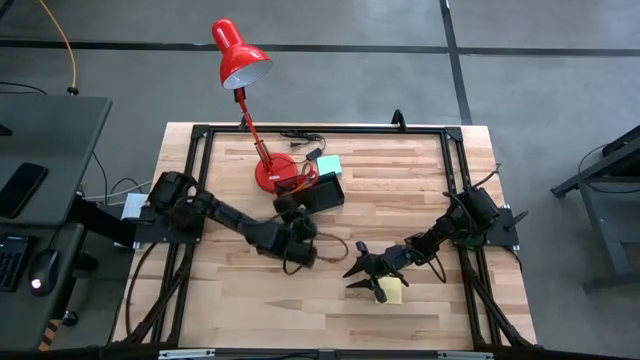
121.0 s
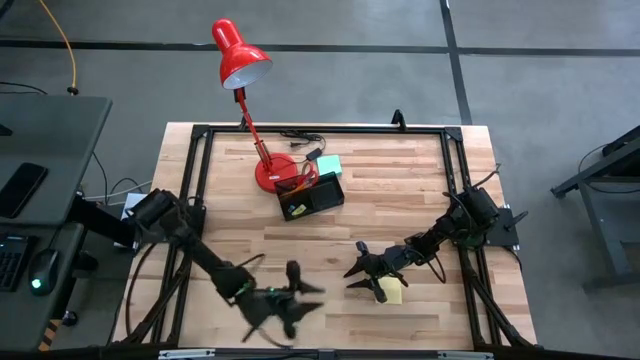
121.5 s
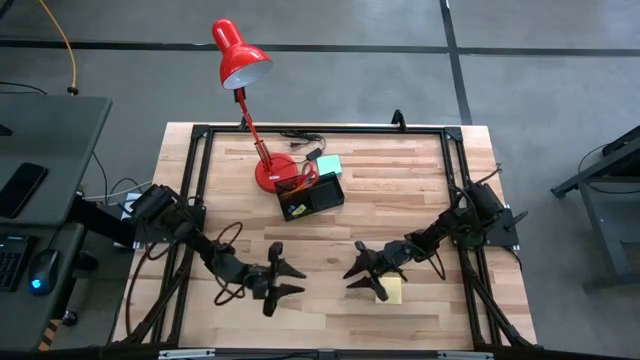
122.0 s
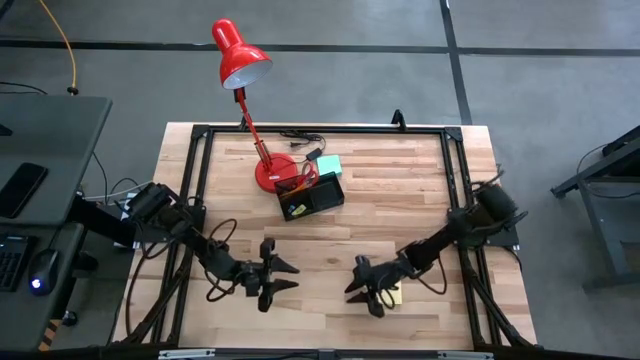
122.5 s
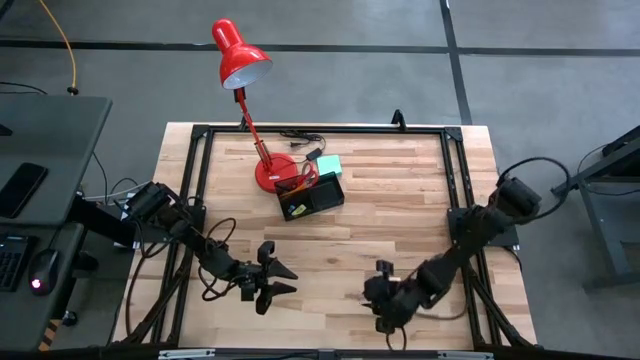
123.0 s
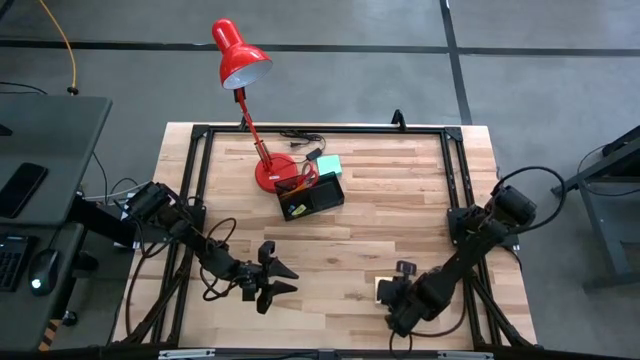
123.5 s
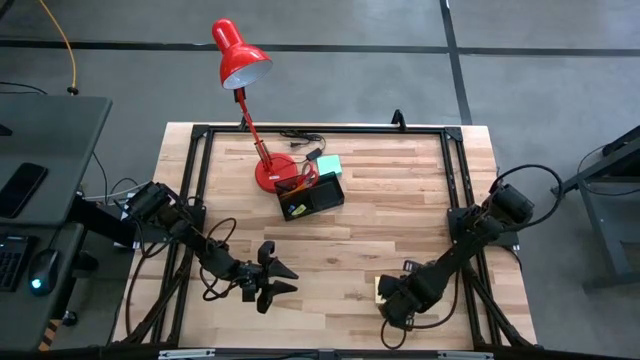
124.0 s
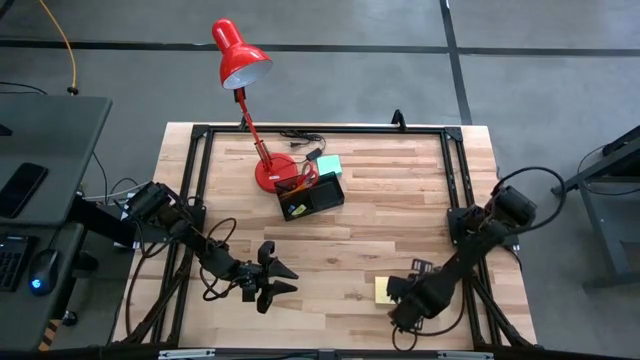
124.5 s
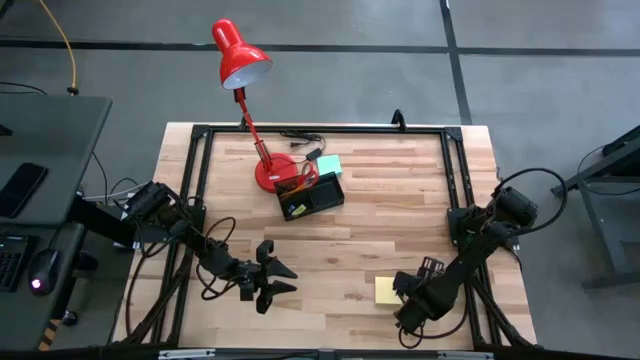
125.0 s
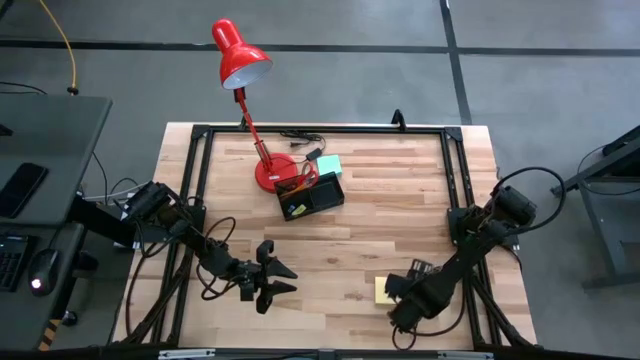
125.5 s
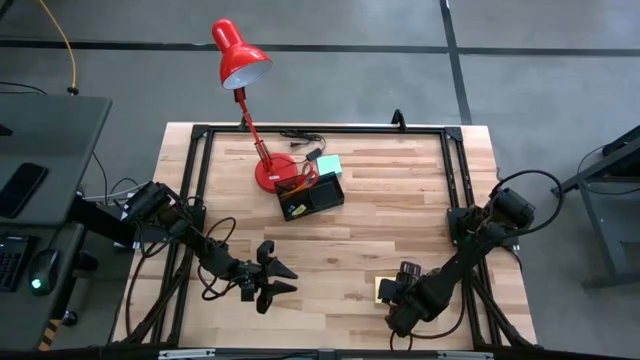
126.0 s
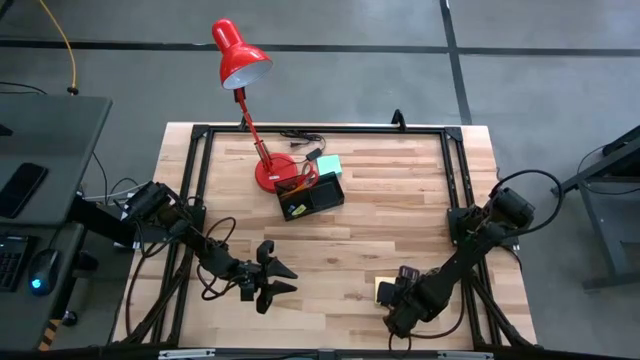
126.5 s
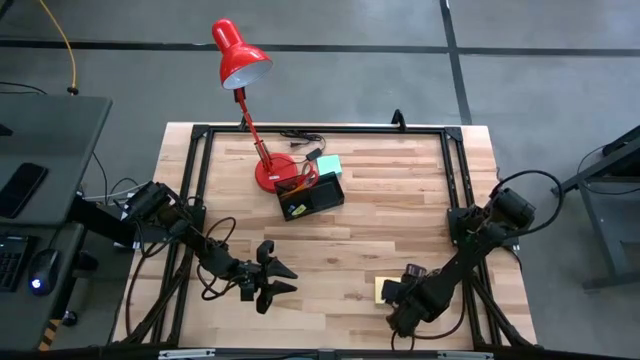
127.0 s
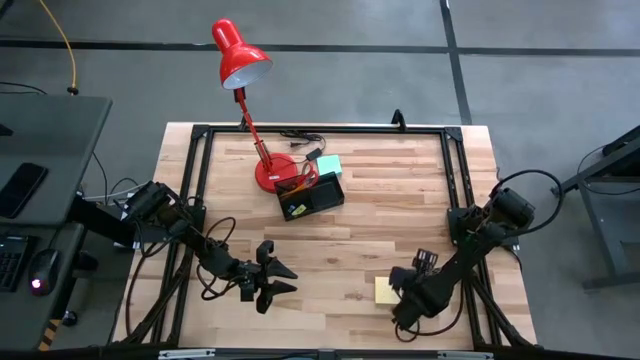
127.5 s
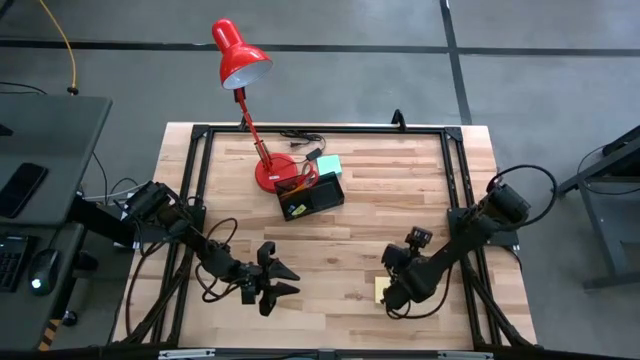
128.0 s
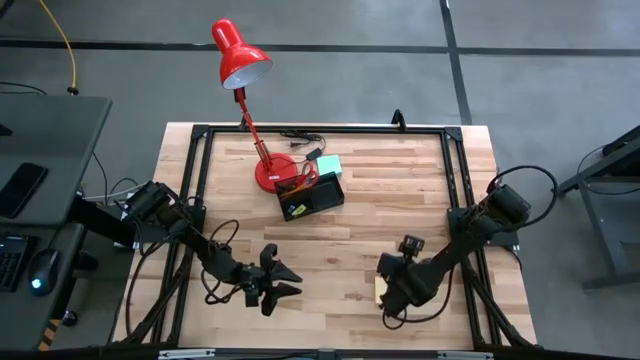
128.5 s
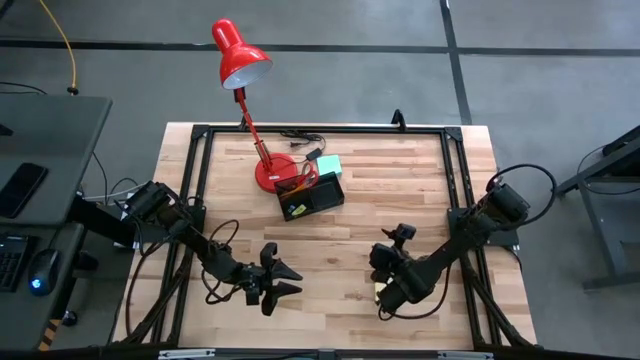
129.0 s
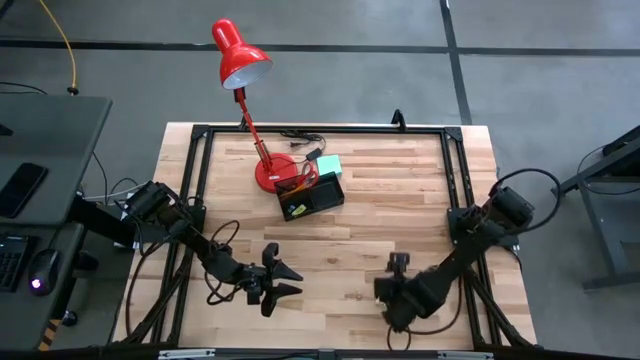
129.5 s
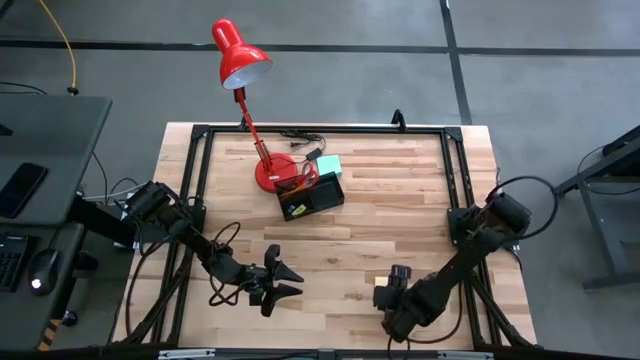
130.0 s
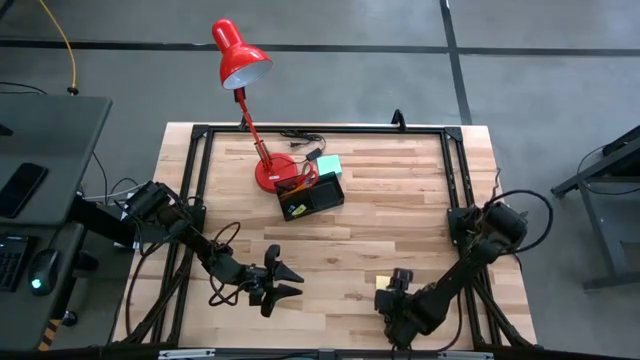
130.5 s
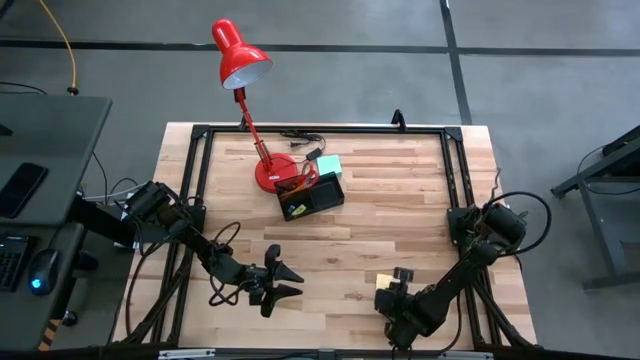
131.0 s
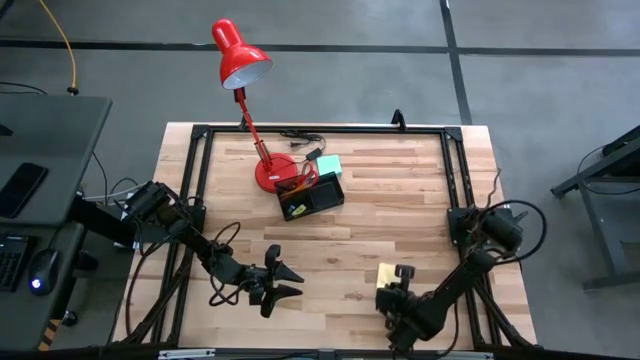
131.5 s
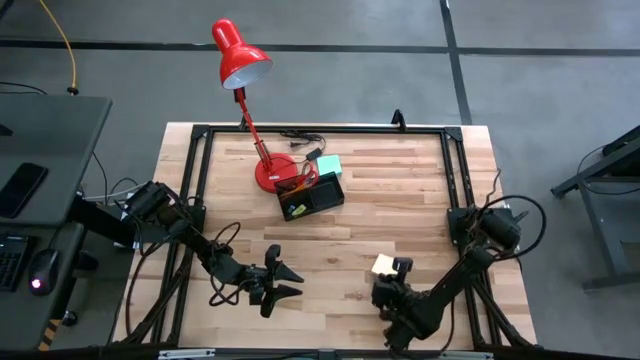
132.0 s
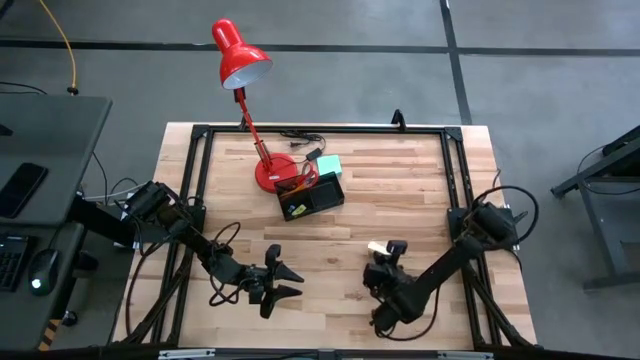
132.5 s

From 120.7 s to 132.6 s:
Task: Pick and place office supplies into organizer
Put the yellow sticky notes into the desk organizer

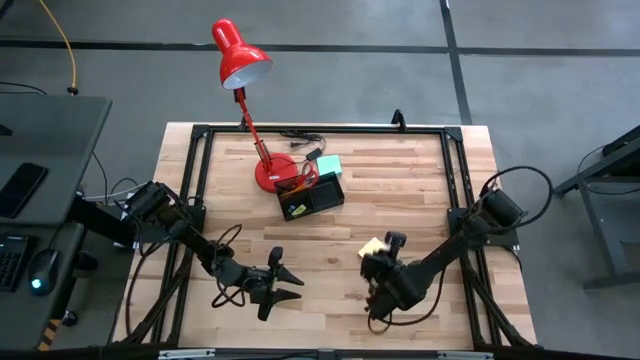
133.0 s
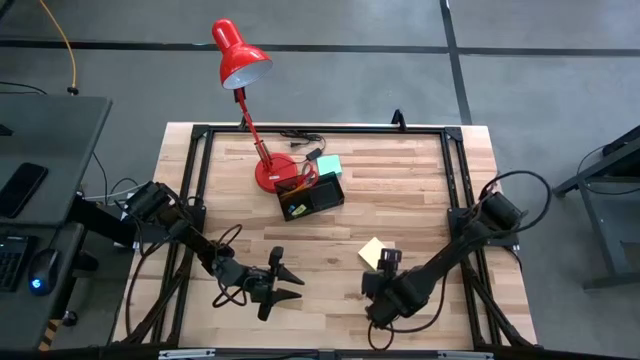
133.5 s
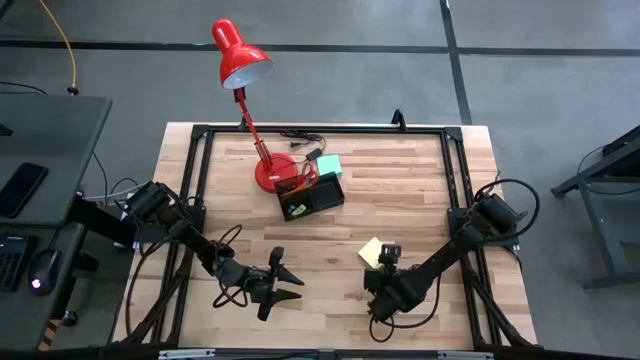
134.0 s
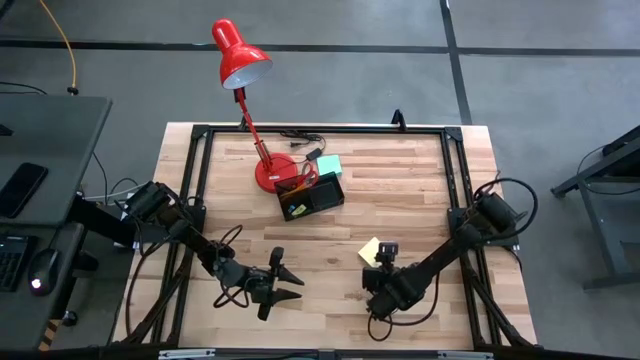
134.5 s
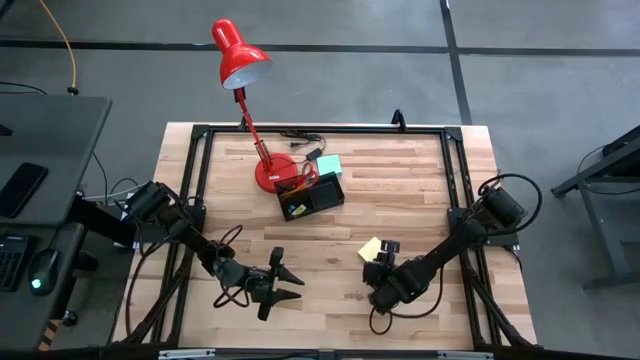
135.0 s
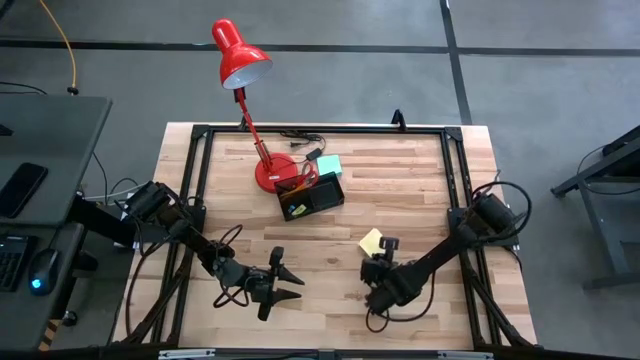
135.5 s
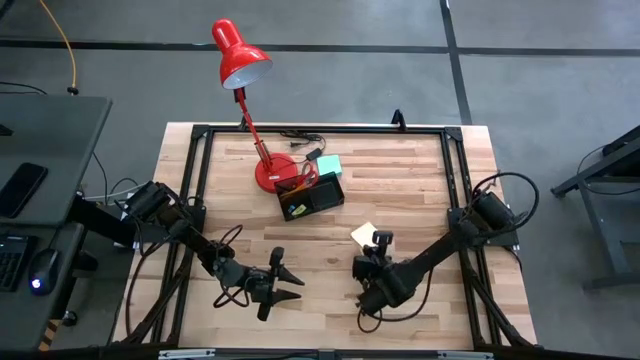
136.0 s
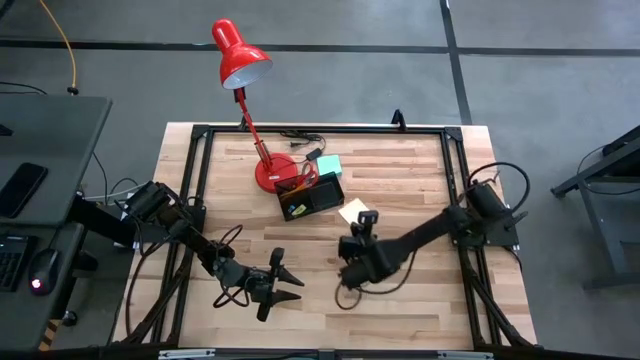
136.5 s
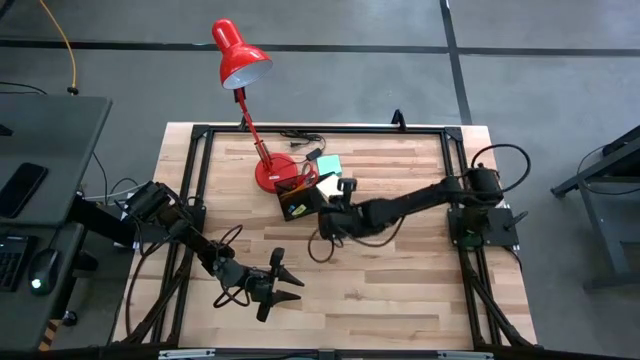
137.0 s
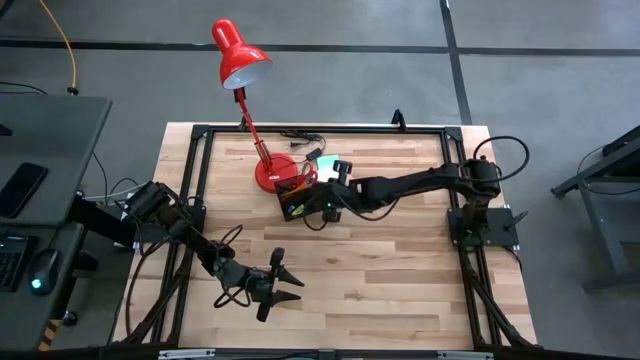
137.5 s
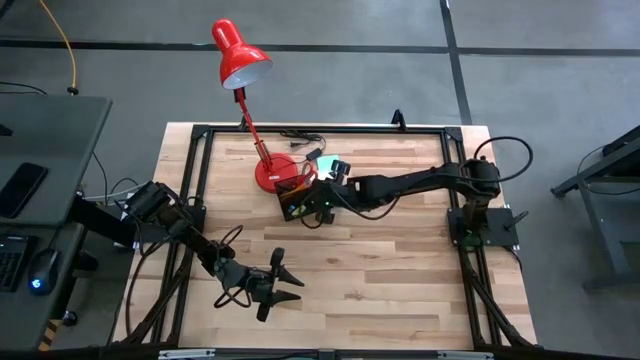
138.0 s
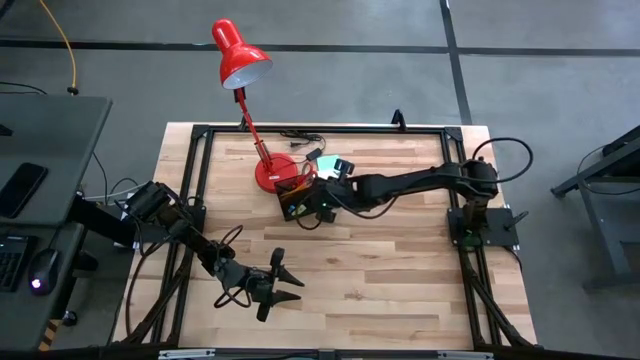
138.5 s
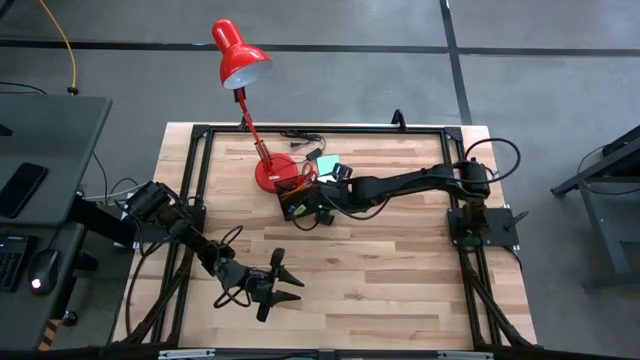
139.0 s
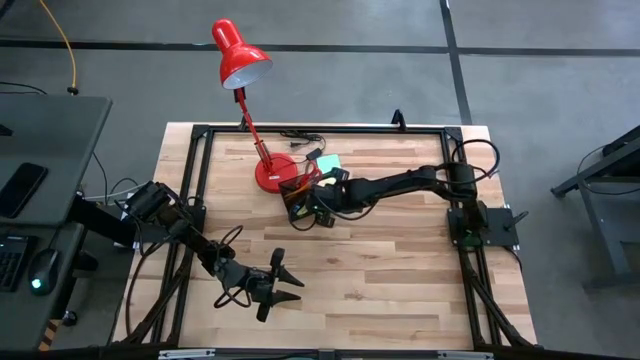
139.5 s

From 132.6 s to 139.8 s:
Put the yellow sticky notes into the desk organizer

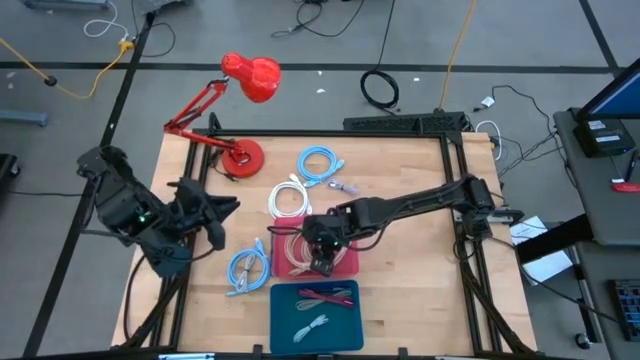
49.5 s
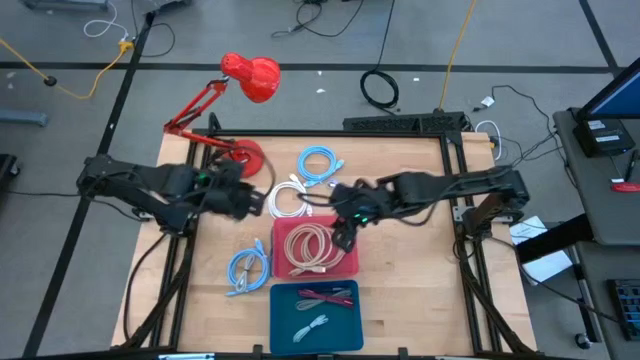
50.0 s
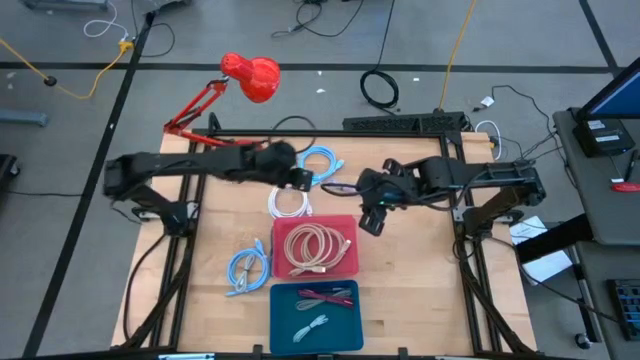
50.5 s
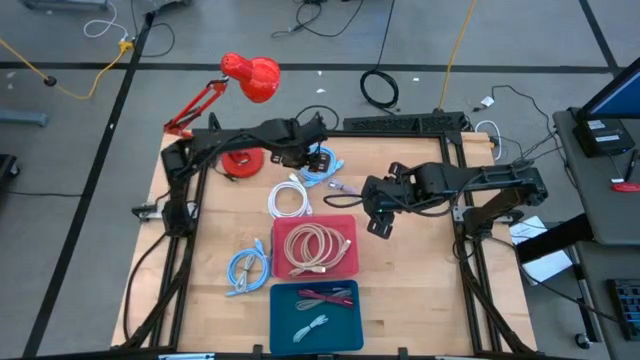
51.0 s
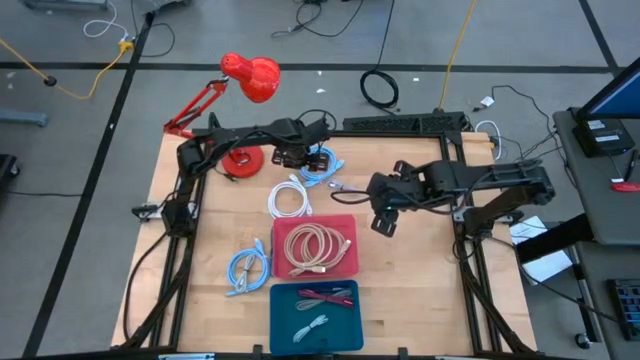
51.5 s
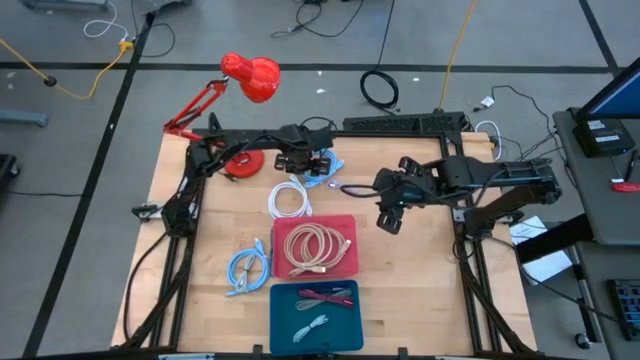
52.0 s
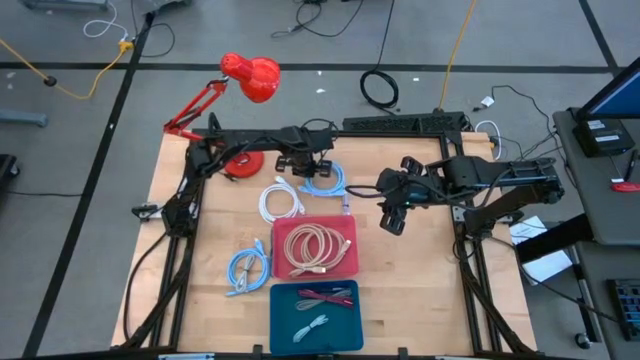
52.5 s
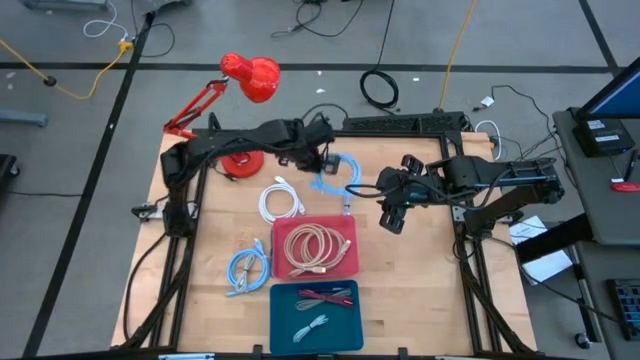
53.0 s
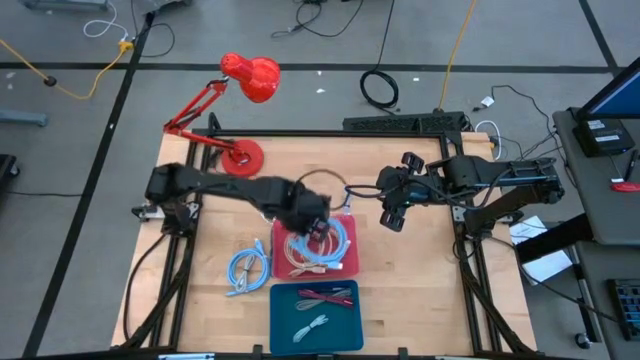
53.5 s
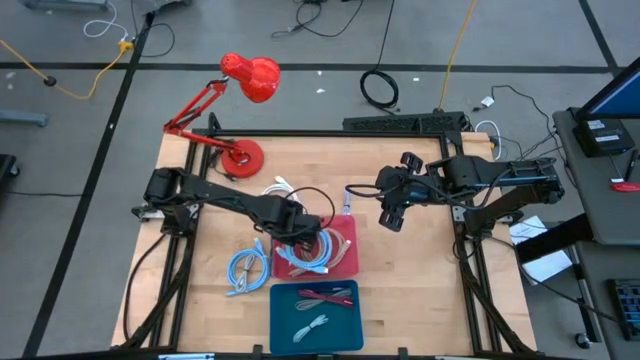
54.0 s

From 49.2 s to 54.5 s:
Task: Pick & Place USB Port
Put the top blue HDMI cable into the red bin
